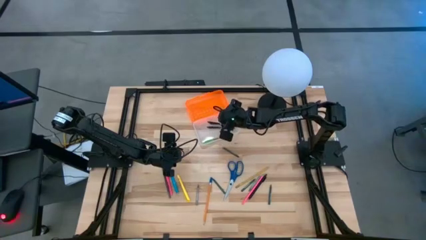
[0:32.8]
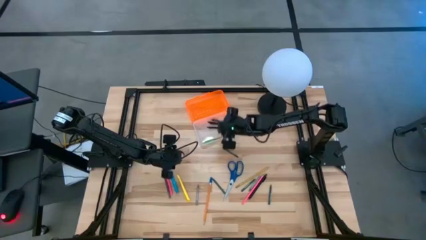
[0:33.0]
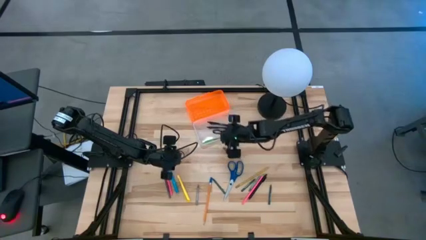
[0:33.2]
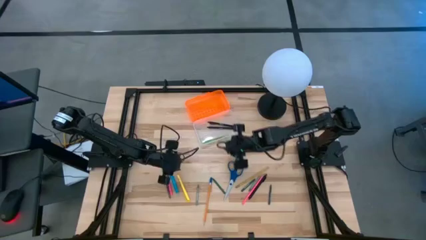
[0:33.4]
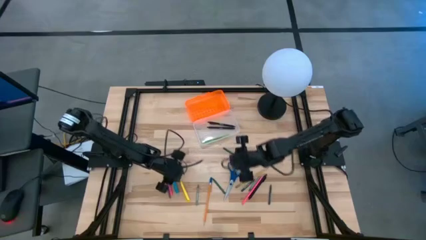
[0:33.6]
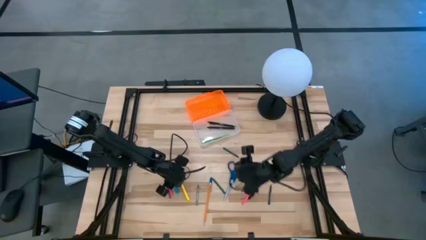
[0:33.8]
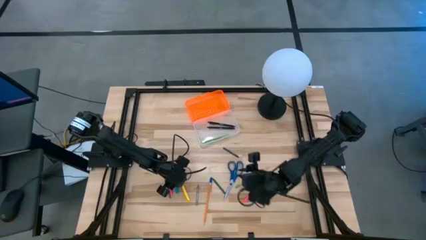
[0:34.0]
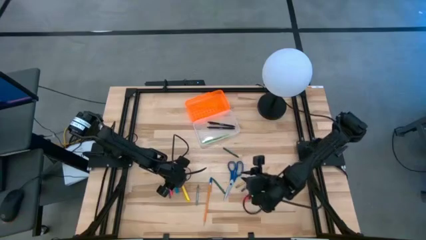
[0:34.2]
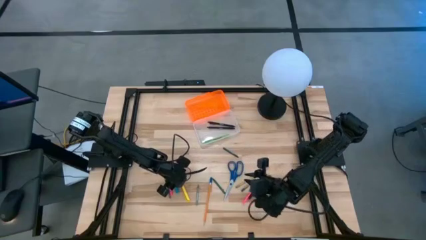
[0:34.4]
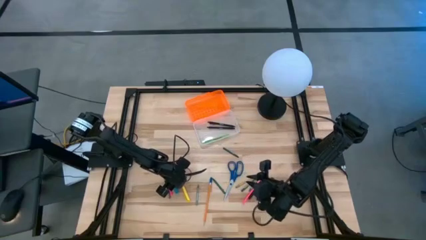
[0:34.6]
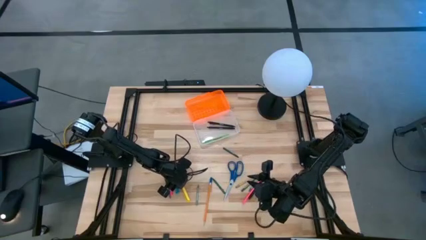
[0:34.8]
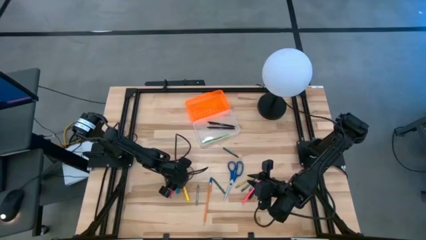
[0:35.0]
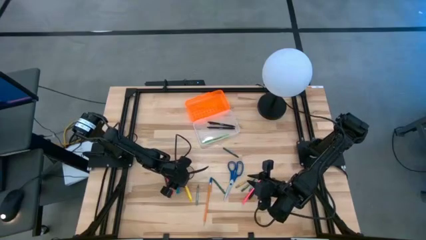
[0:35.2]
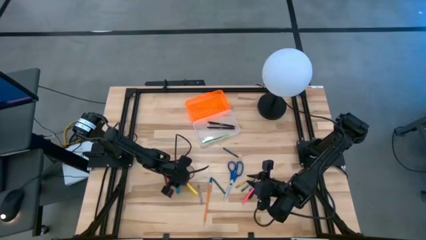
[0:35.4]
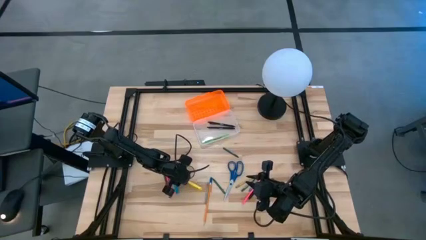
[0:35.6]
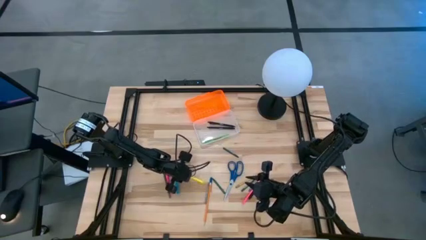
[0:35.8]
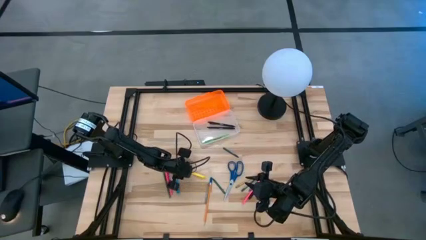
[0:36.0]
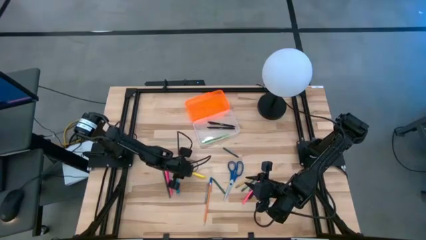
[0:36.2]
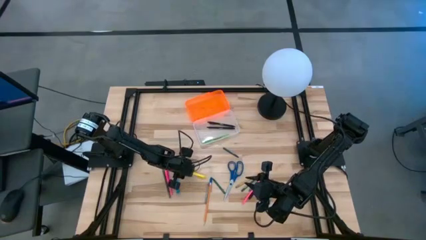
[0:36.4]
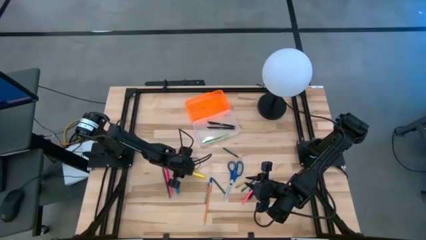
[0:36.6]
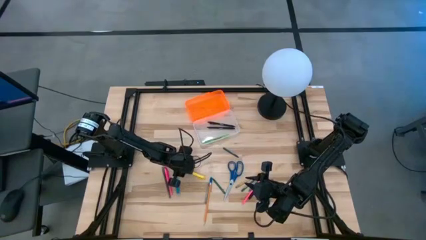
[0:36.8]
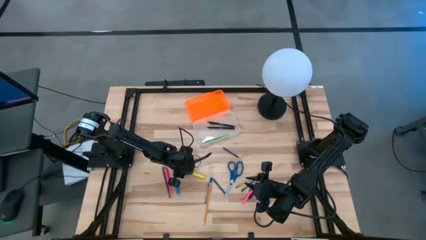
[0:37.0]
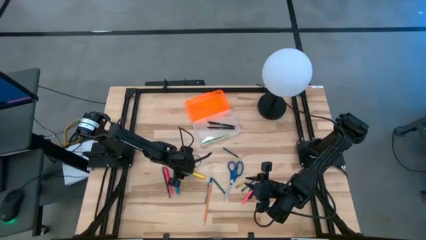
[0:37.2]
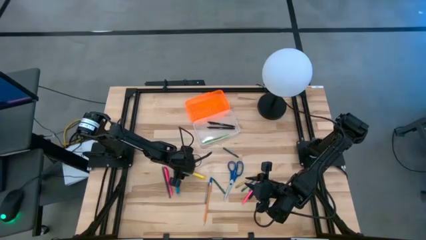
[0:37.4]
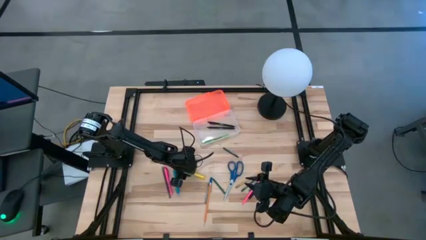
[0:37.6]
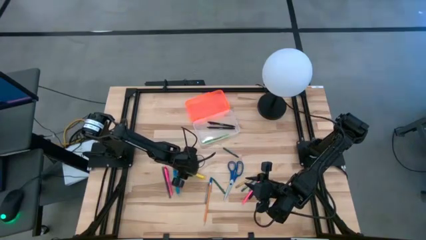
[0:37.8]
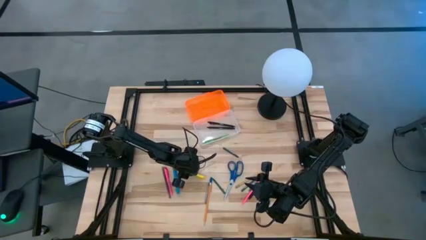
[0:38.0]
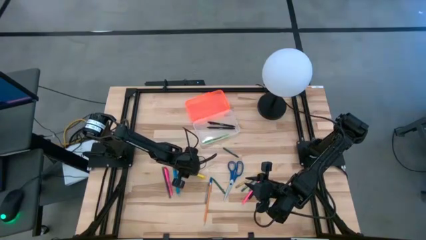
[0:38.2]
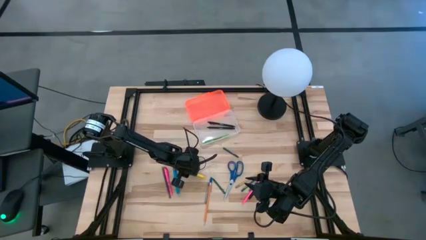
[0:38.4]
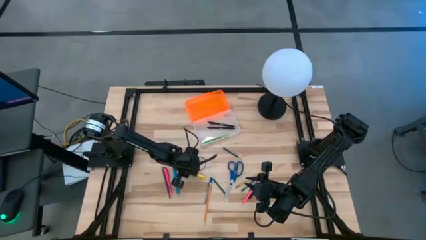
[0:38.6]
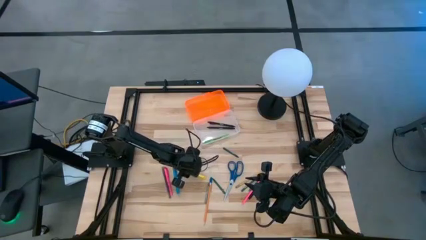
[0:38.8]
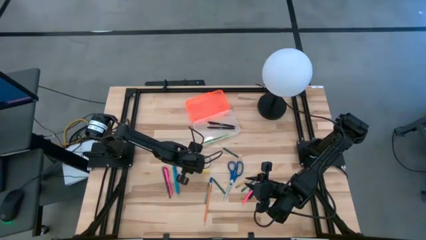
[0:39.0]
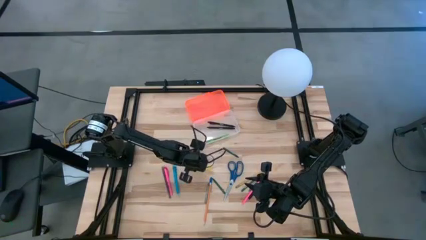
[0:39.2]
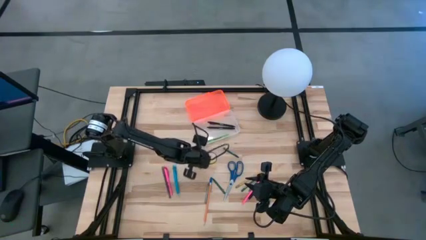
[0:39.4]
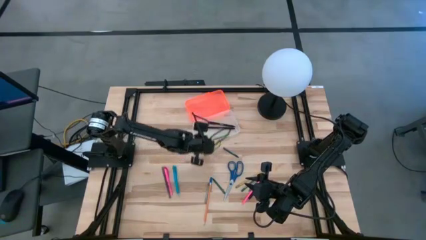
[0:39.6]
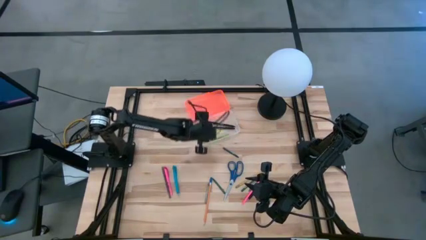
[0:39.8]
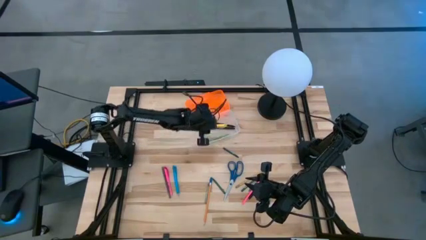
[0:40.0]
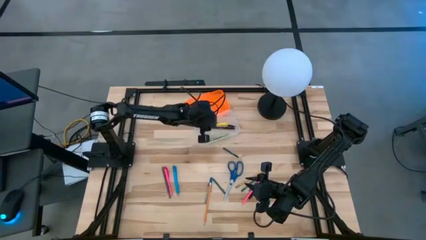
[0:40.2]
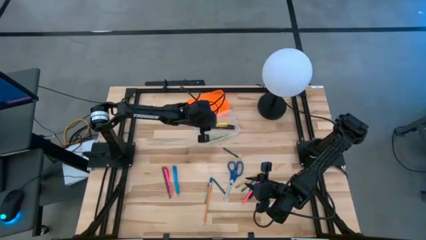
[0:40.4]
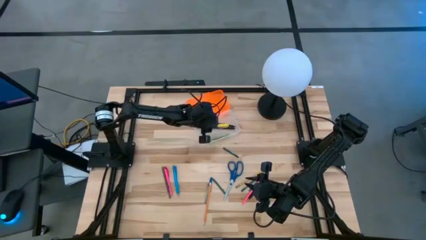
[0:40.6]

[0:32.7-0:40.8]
Task: Pick & place school supplies into a supply box
Put the yellow pen into the supply box

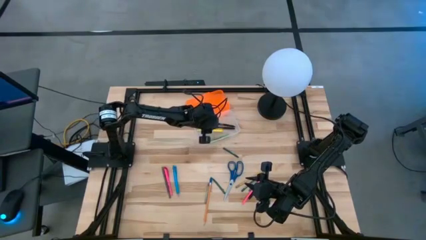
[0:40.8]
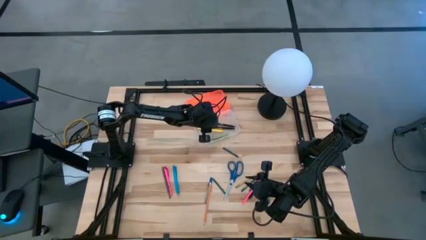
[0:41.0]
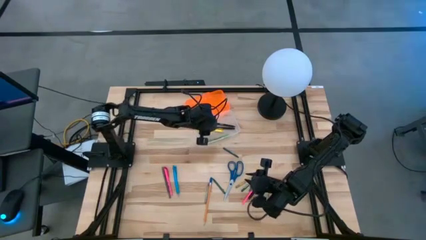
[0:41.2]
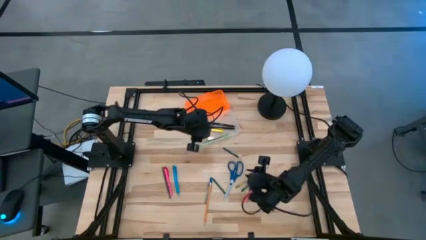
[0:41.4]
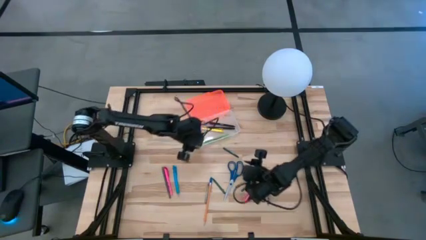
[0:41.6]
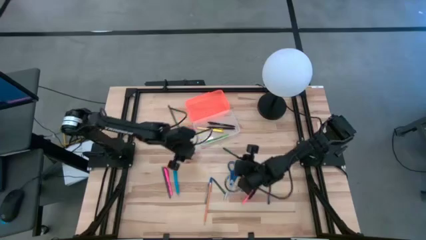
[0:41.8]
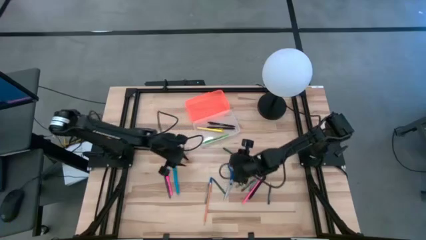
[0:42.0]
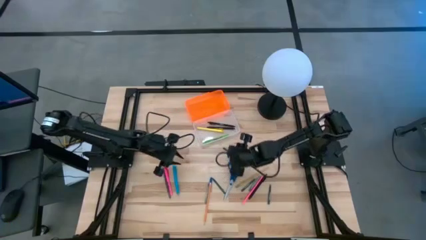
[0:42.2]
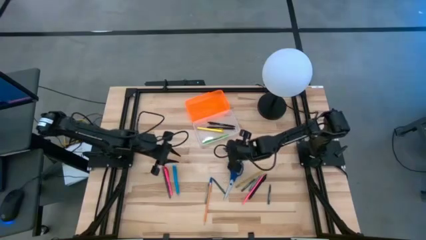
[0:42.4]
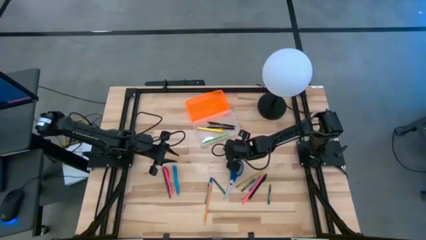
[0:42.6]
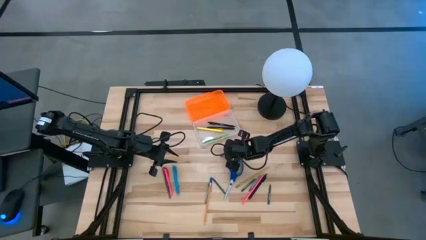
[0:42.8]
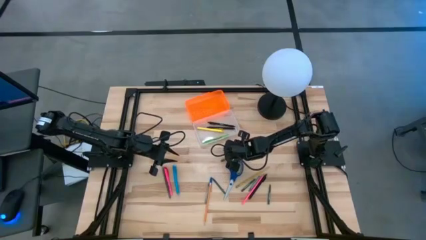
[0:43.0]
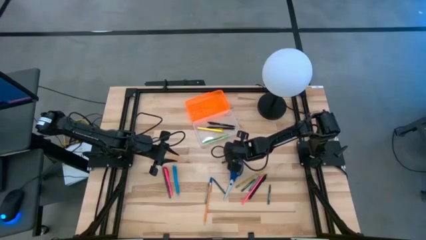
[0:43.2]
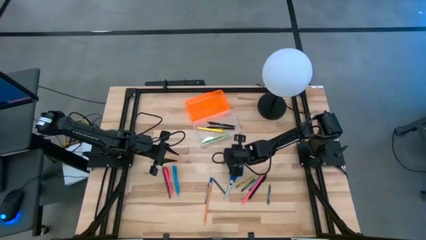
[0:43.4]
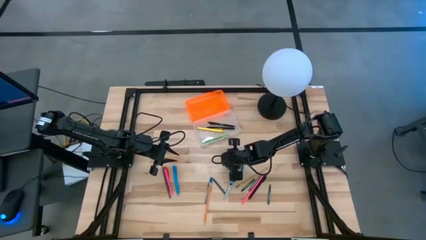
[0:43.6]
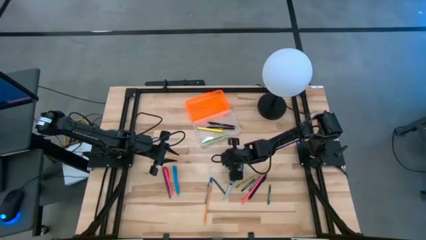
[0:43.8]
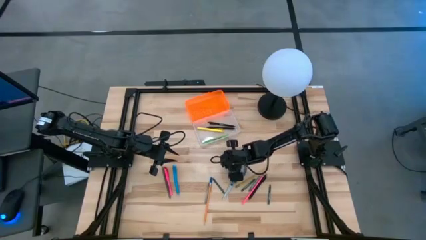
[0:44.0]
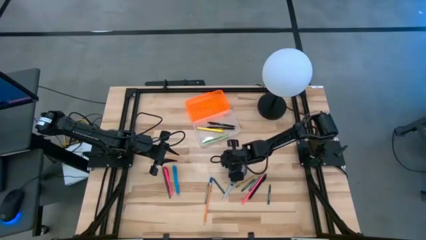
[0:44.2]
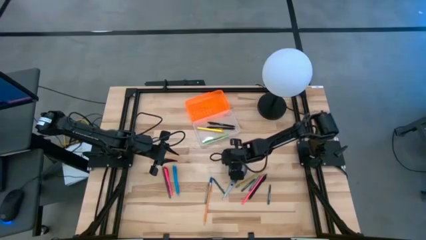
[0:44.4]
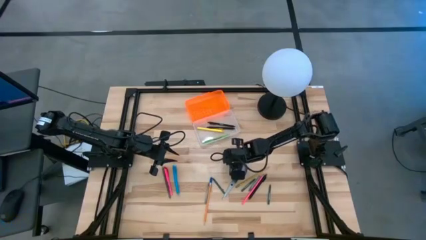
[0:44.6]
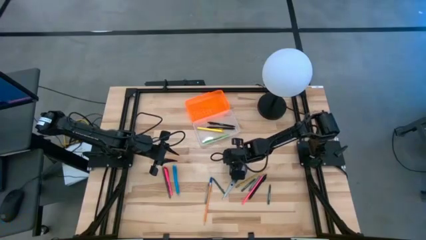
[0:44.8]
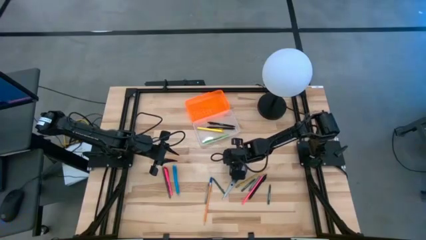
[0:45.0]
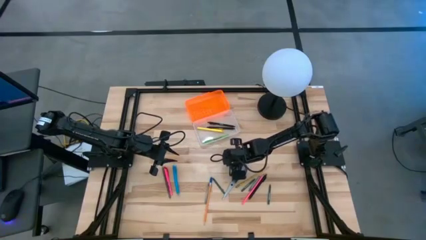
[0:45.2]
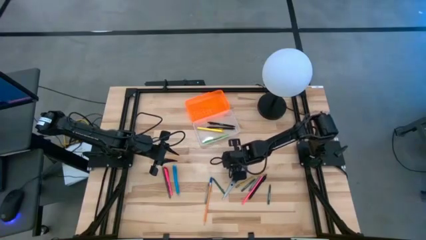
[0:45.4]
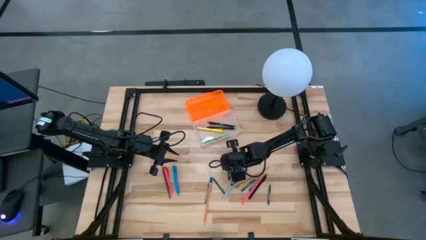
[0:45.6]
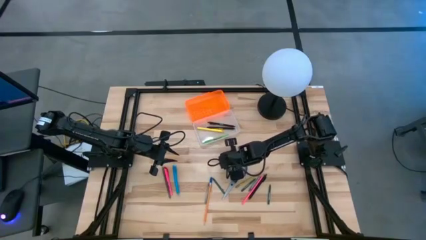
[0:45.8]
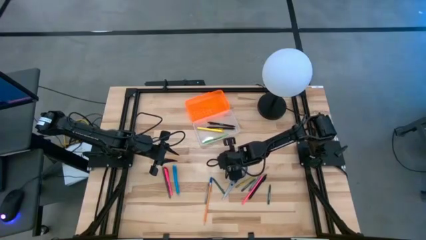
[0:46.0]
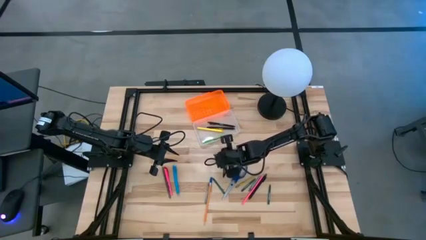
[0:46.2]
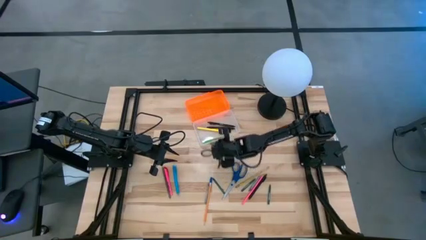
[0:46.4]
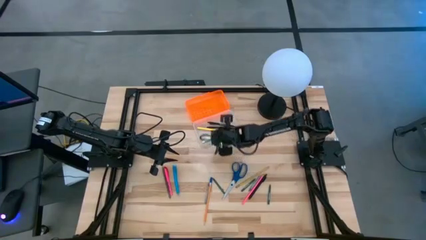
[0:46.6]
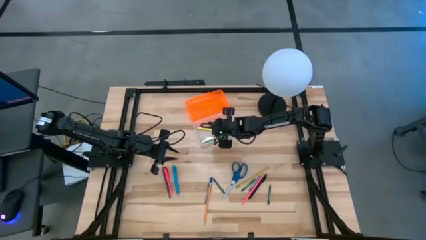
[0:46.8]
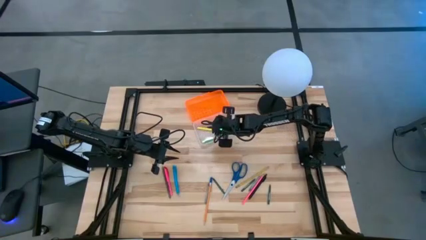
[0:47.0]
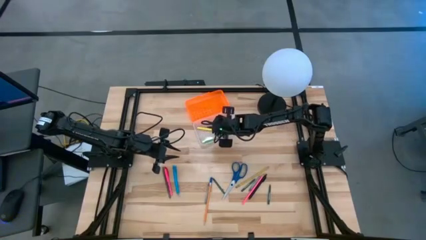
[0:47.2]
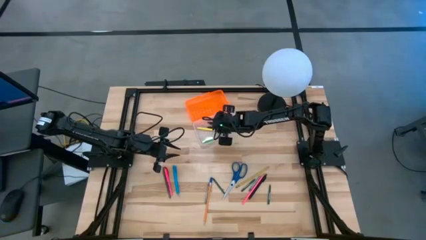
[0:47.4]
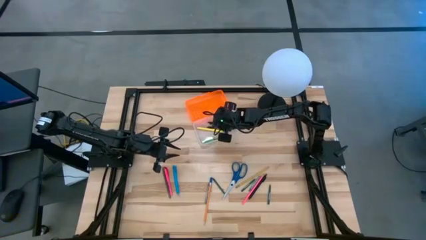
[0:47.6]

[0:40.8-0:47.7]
Put the top green crayon into the supply box
